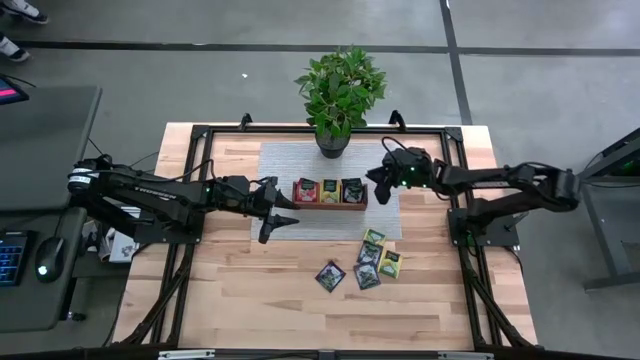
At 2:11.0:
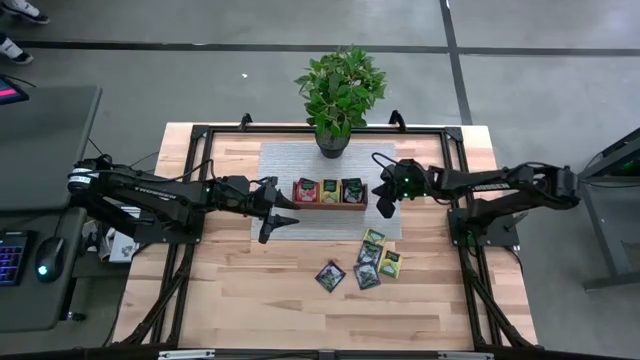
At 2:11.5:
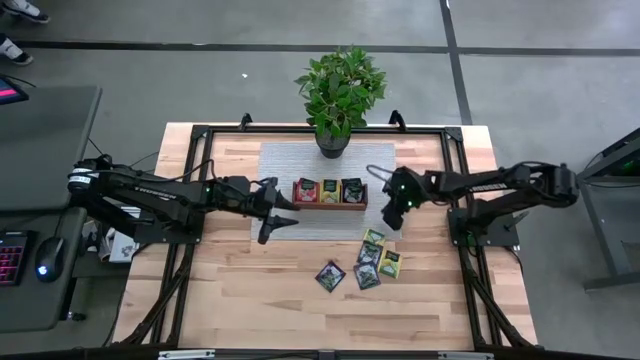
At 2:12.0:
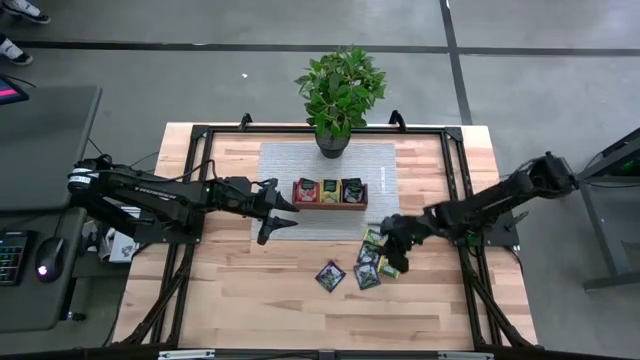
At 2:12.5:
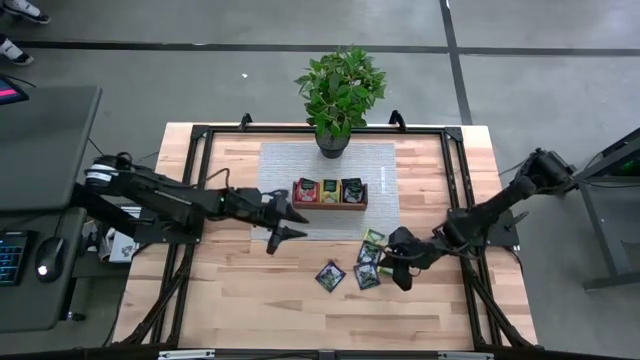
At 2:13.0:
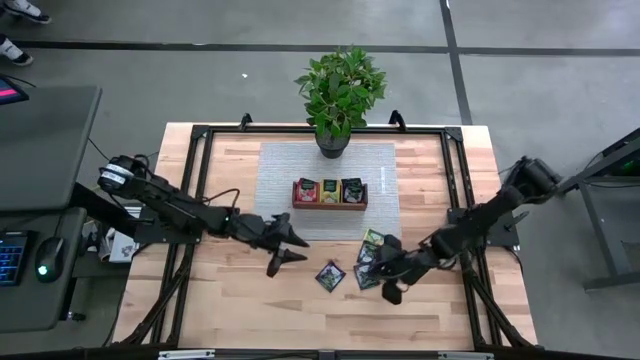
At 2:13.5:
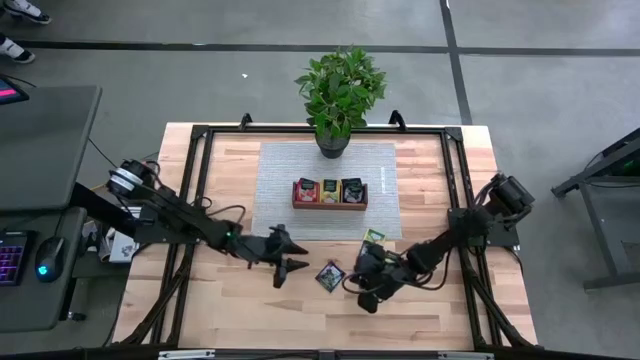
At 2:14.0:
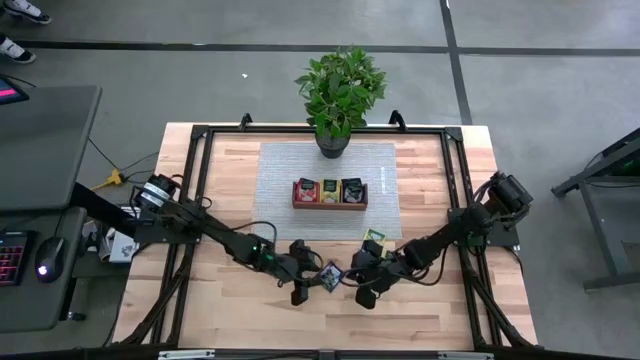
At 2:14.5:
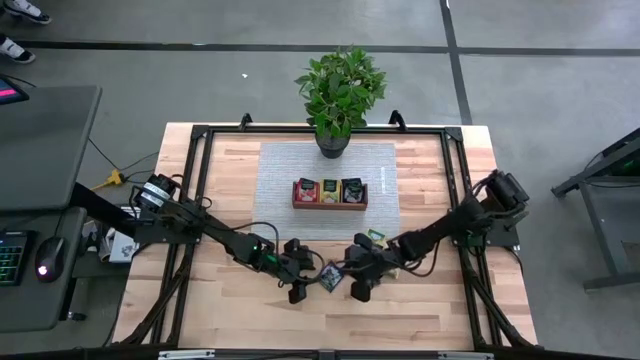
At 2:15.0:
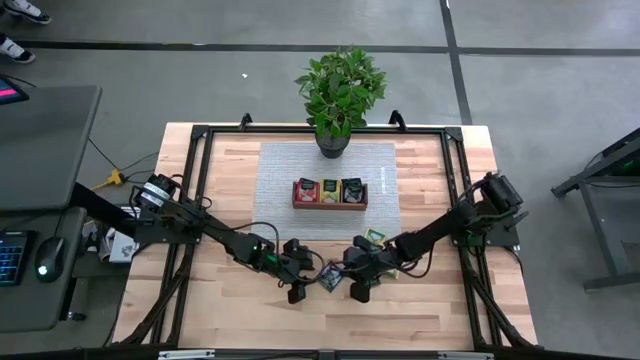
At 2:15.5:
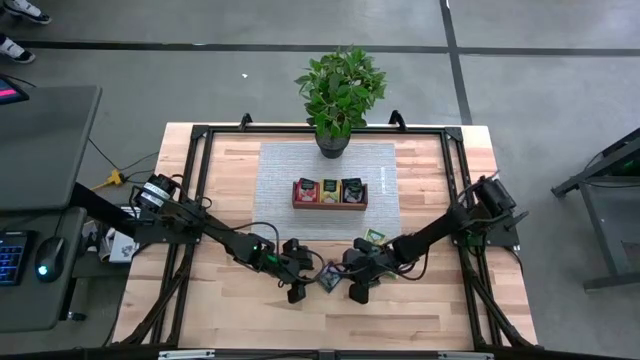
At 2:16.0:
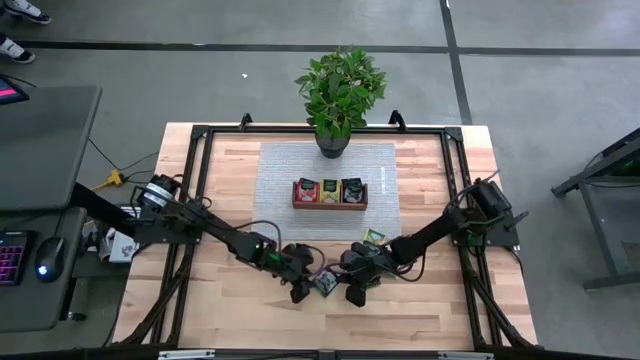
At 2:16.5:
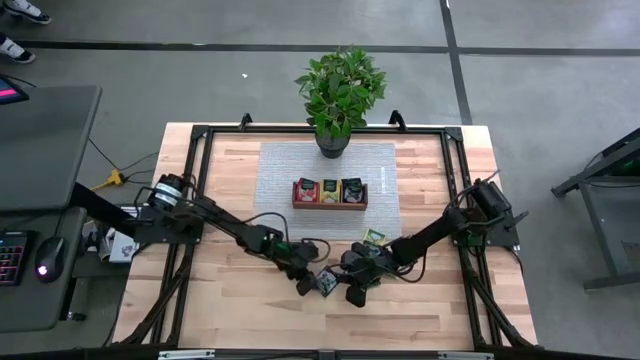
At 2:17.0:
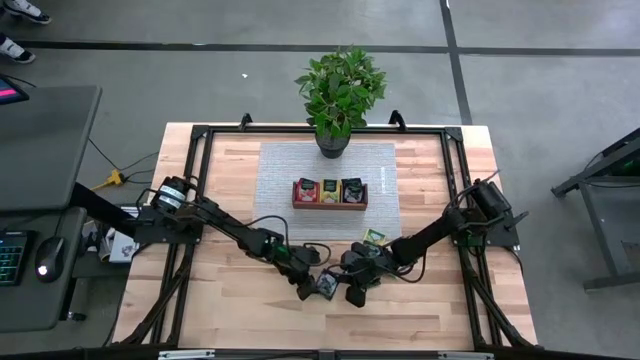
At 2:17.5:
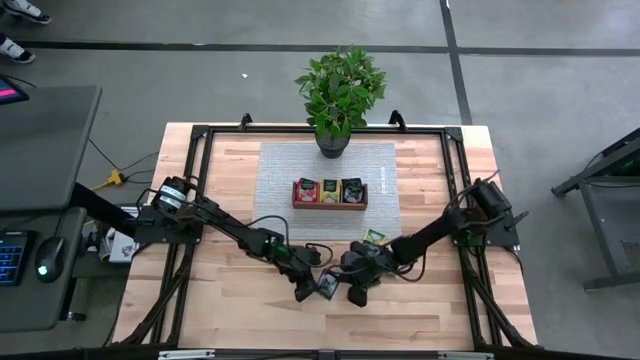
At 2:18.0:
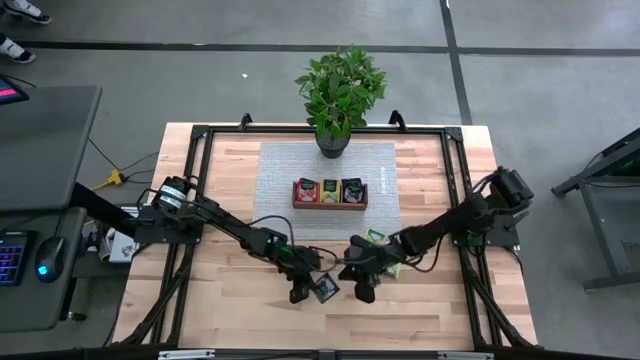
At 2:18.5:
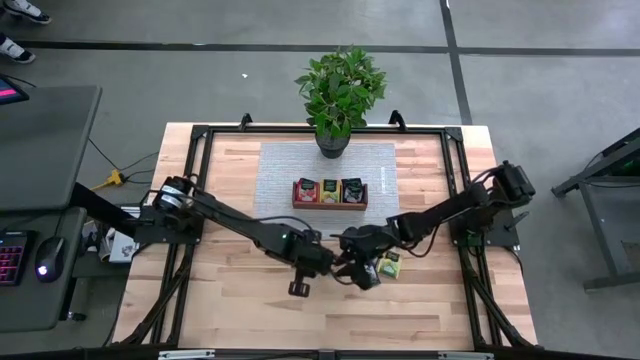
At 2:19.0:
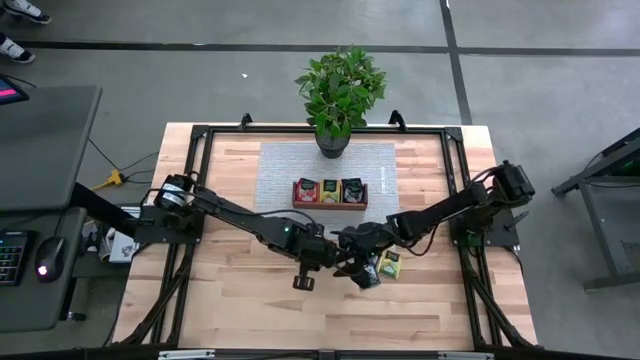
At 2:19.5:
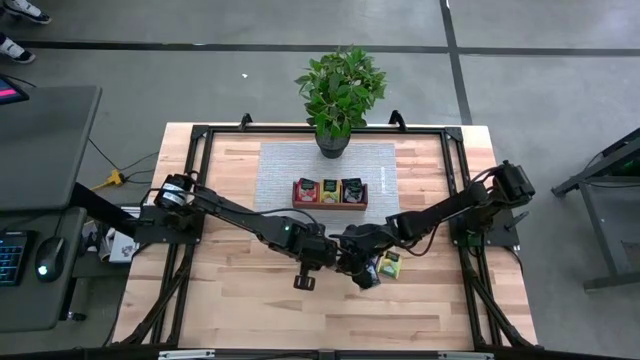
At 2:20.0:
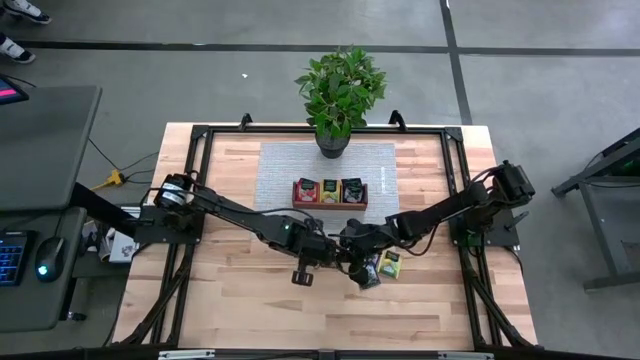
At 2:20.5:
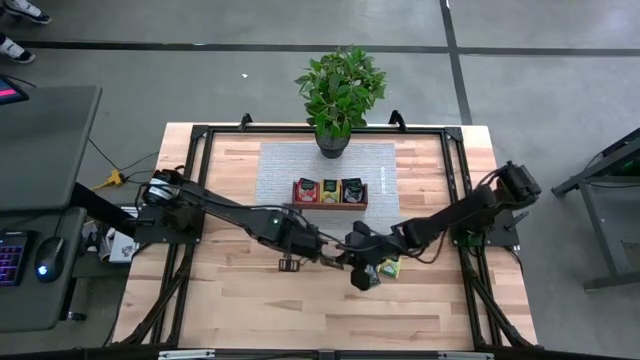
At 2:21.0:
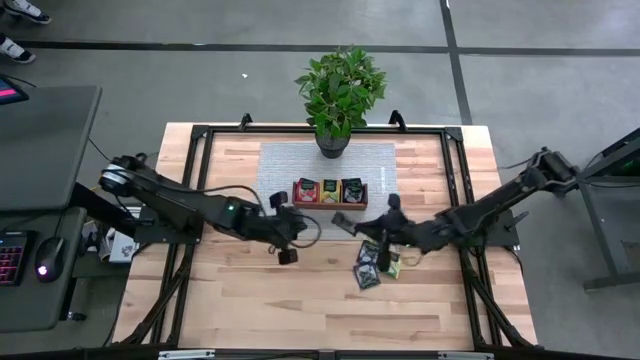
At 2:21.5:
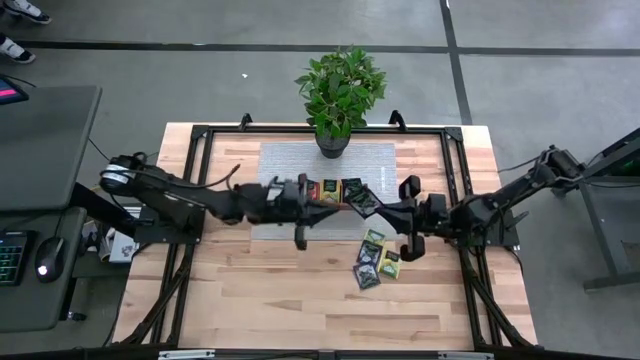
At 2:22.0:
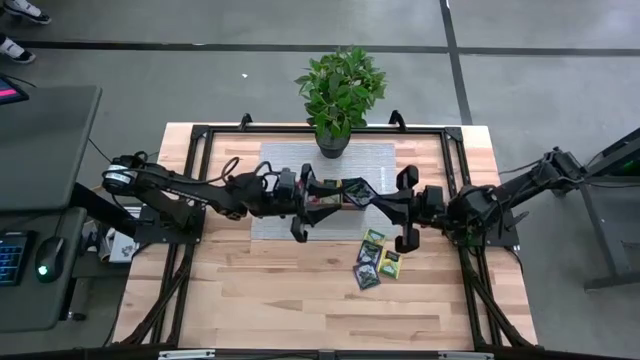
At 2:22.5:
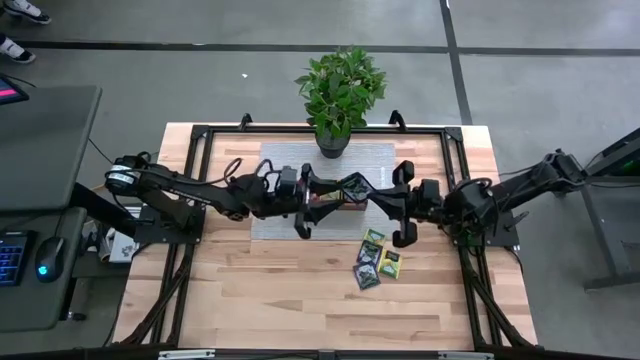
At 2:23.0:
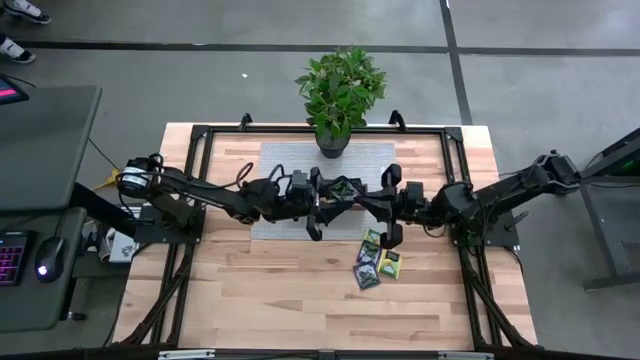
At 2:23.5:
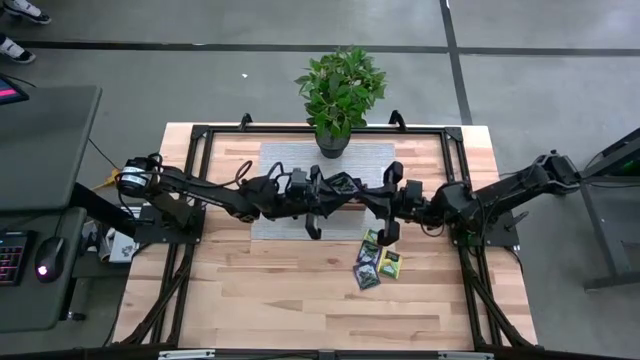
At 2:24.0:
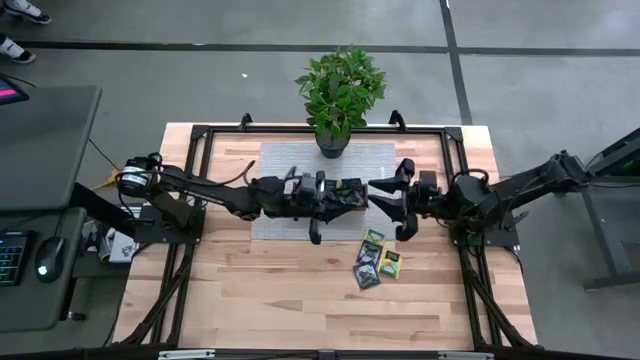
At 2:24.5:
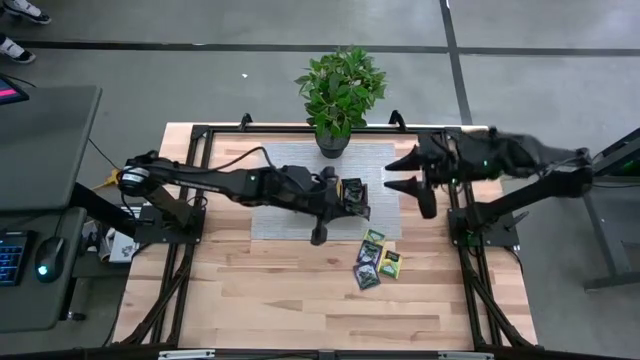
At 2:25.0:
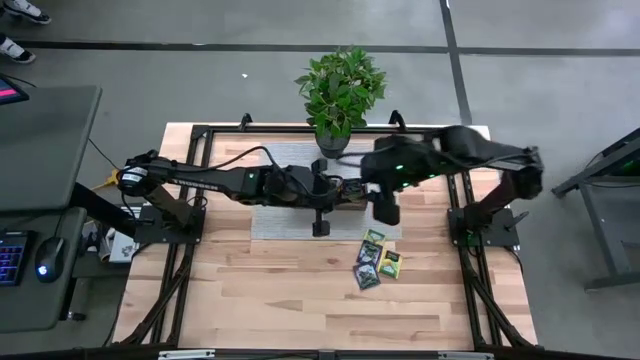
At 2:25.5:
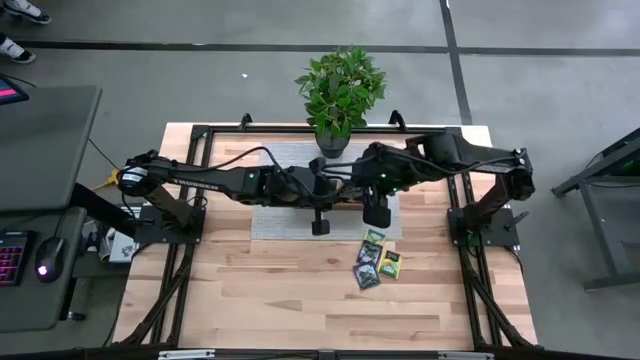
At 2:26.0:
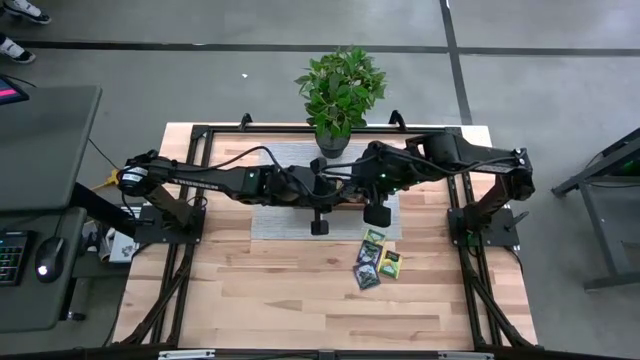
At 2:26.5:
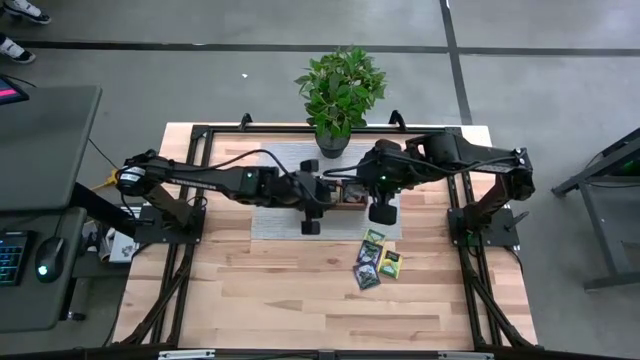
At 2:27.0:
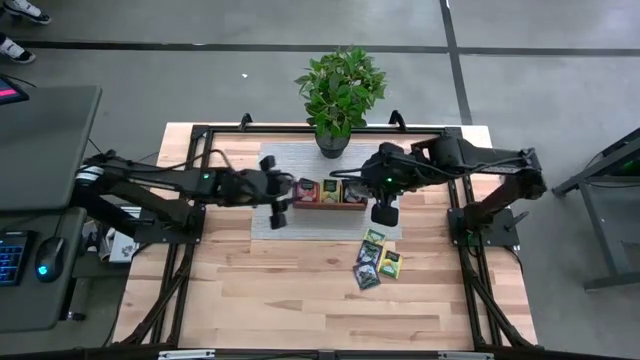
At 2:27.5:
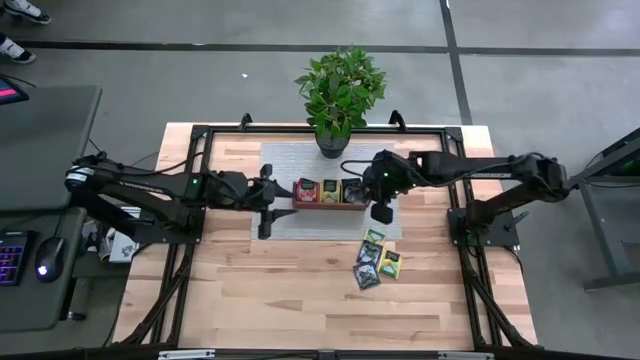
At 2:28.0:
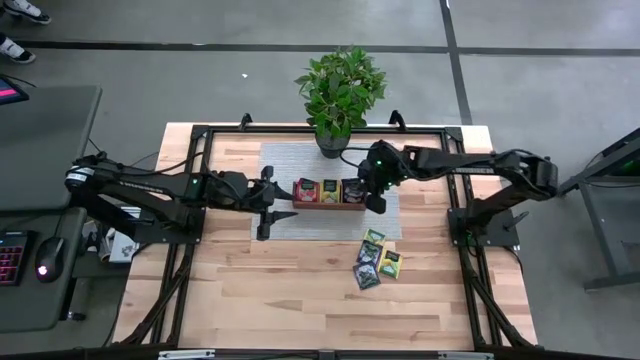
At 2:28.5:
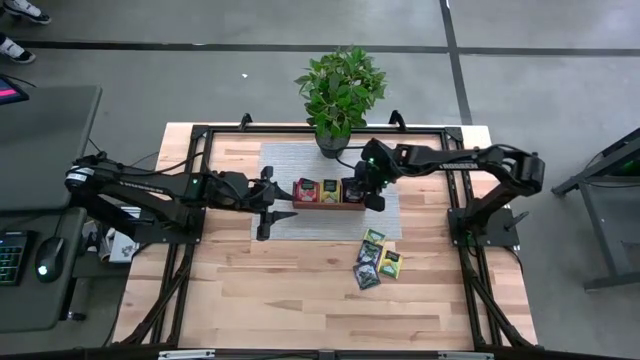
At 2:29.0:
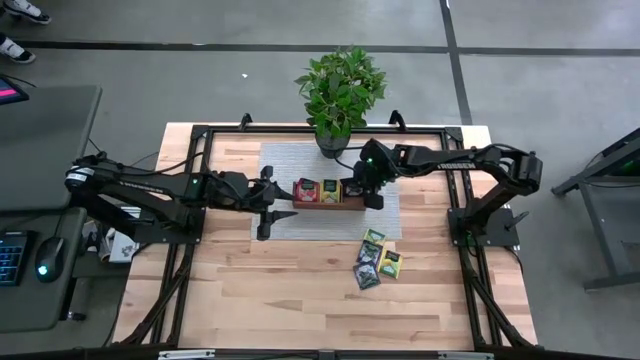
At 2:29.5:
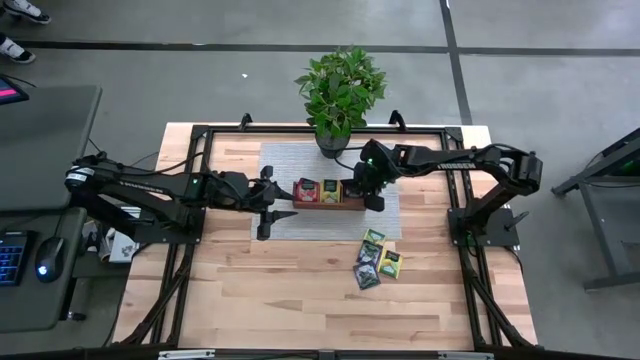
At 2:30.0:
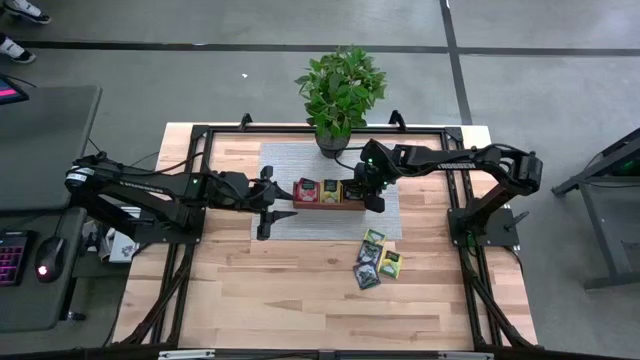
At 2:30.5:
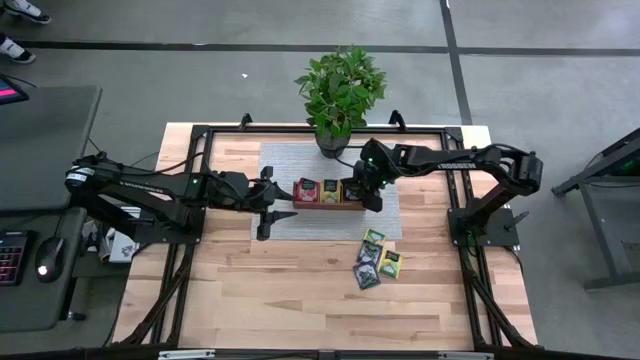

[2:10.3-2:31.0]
Task: Pick & Place Tea
Put the violet tea bag into the right section of the wooden organizer
